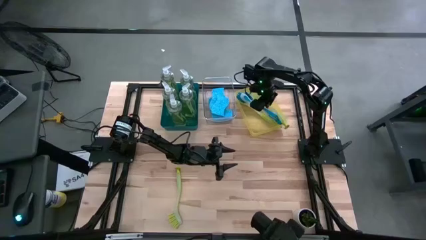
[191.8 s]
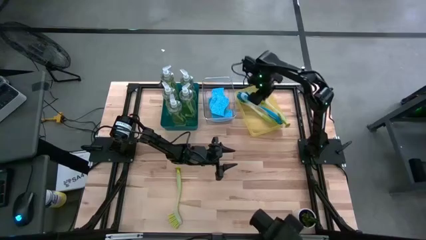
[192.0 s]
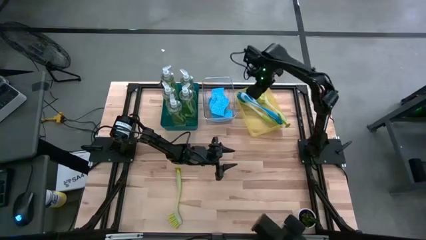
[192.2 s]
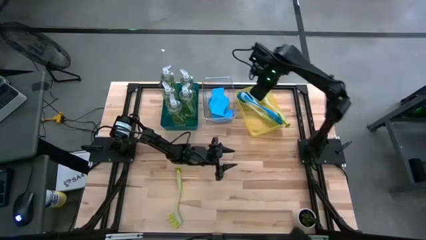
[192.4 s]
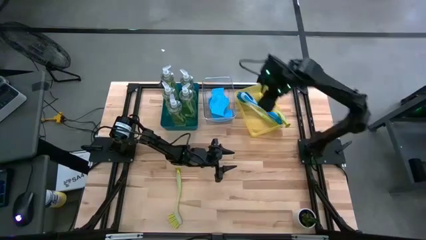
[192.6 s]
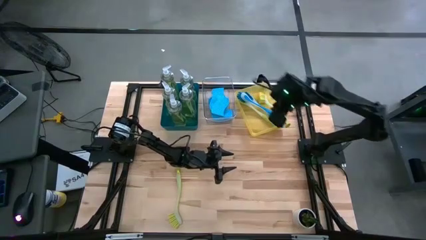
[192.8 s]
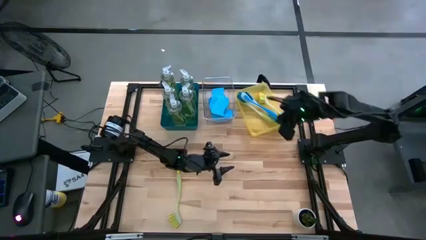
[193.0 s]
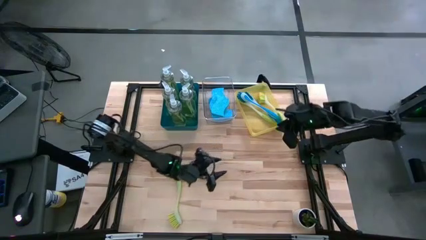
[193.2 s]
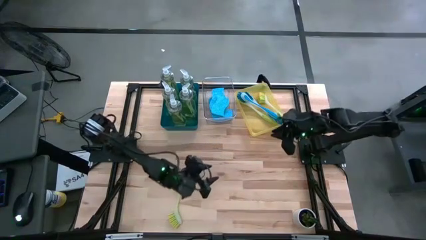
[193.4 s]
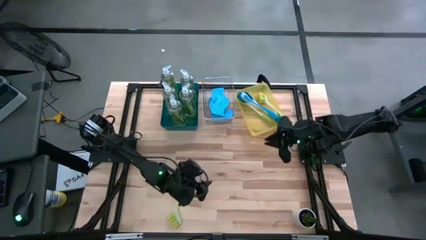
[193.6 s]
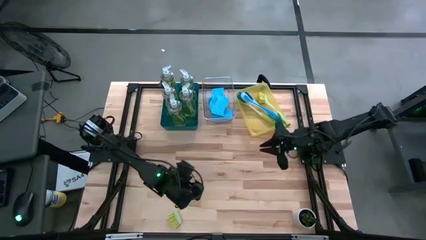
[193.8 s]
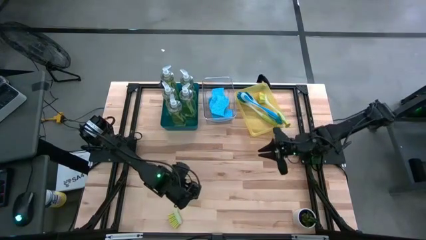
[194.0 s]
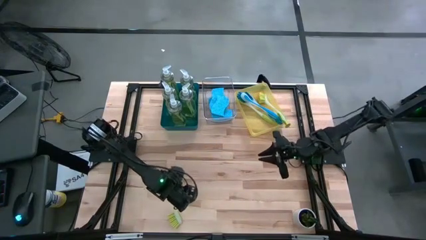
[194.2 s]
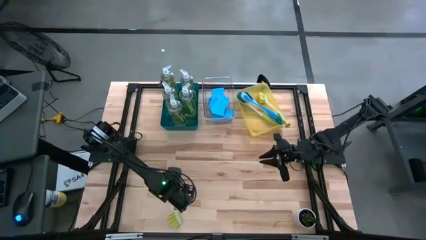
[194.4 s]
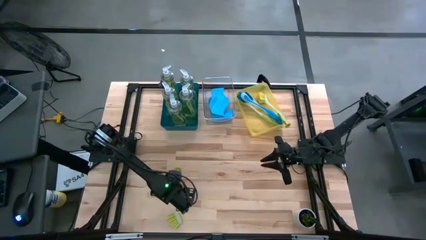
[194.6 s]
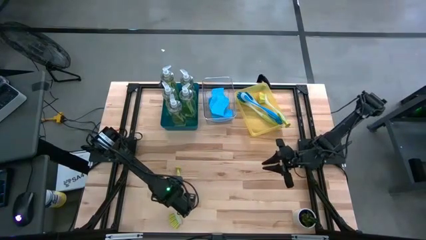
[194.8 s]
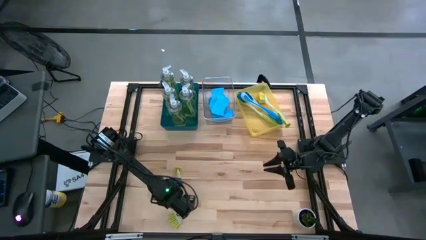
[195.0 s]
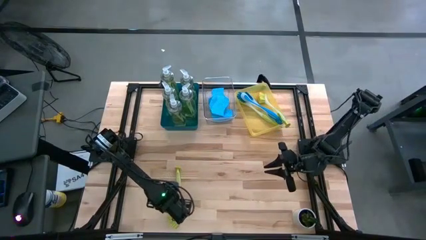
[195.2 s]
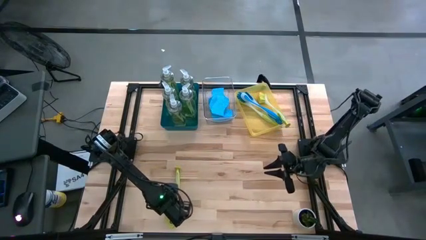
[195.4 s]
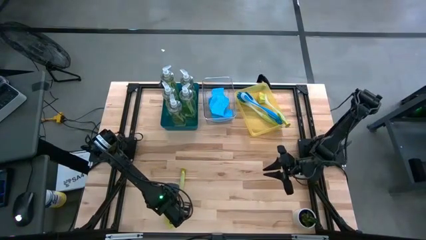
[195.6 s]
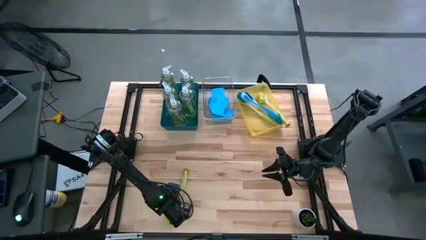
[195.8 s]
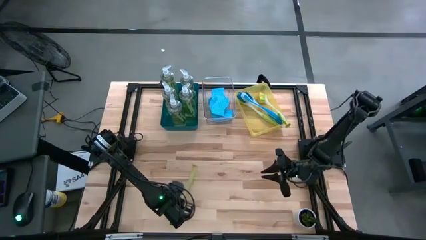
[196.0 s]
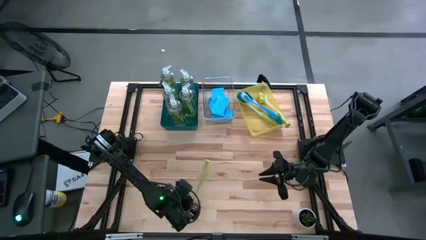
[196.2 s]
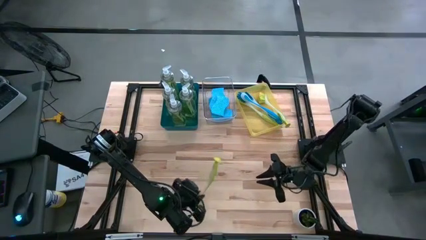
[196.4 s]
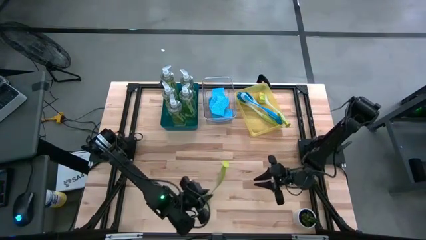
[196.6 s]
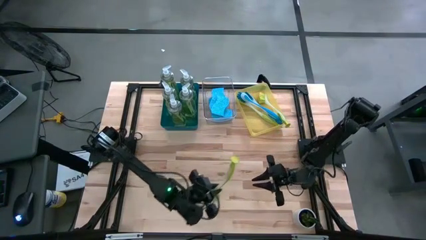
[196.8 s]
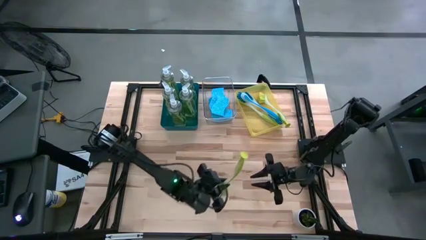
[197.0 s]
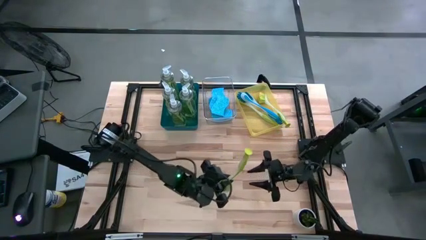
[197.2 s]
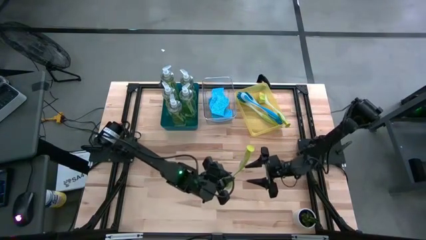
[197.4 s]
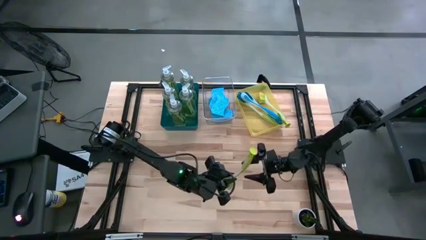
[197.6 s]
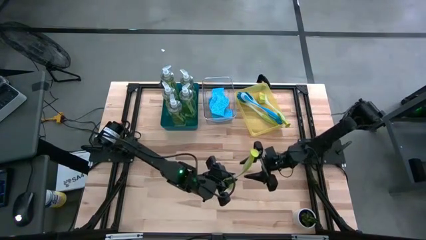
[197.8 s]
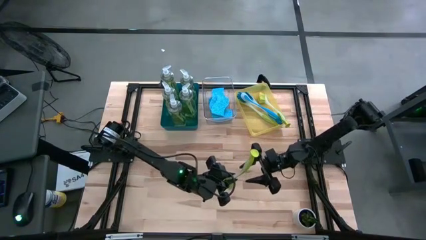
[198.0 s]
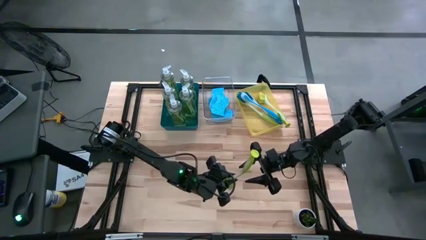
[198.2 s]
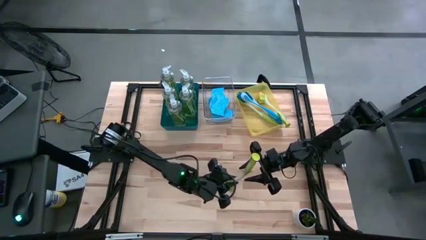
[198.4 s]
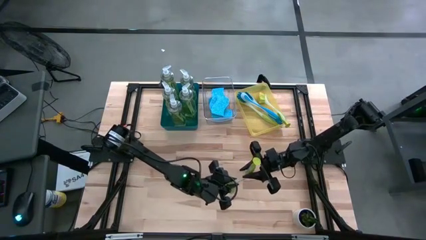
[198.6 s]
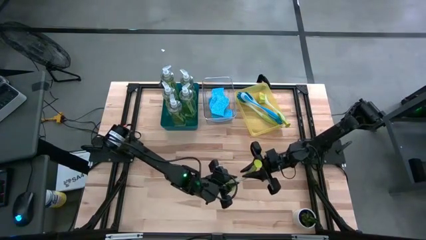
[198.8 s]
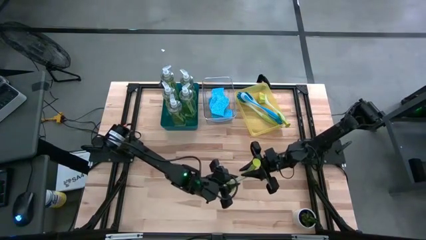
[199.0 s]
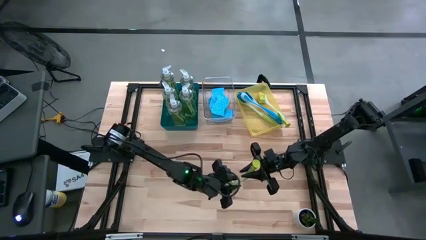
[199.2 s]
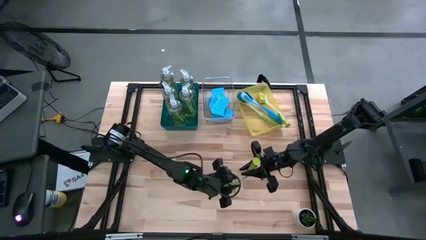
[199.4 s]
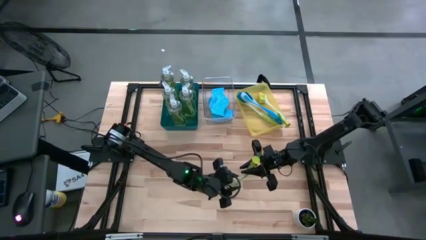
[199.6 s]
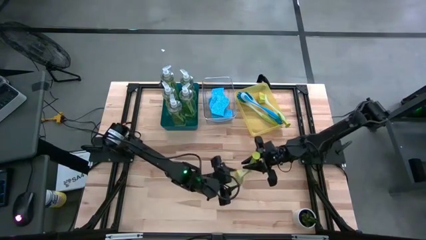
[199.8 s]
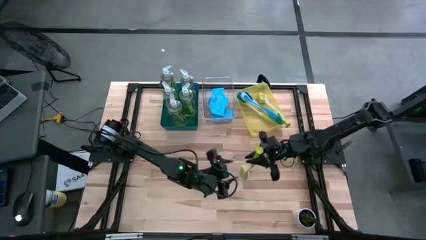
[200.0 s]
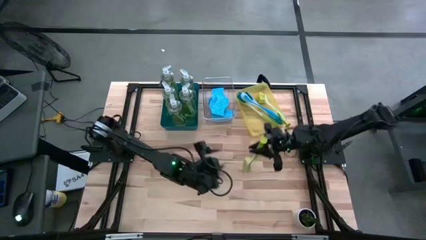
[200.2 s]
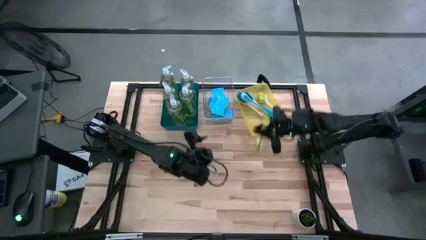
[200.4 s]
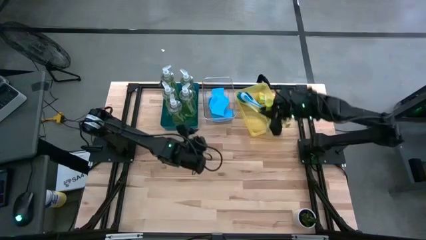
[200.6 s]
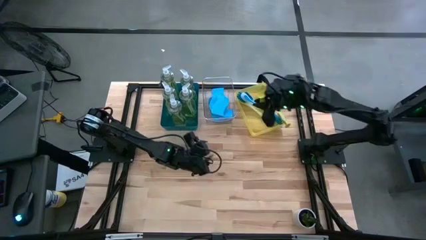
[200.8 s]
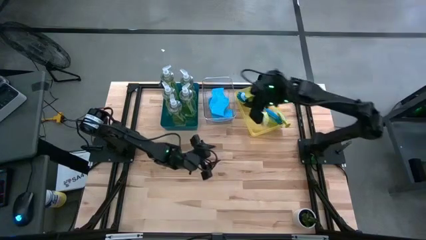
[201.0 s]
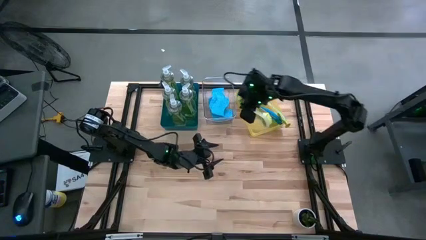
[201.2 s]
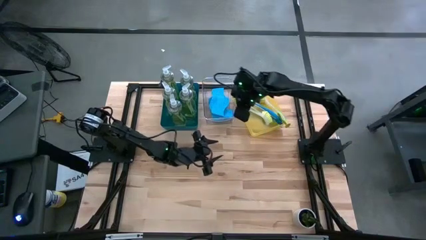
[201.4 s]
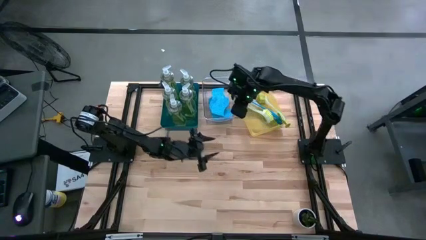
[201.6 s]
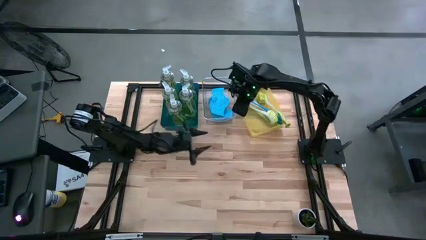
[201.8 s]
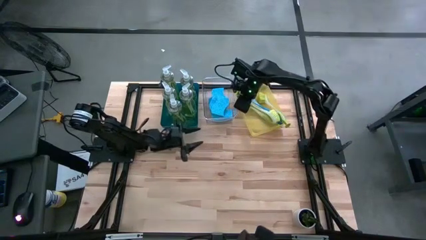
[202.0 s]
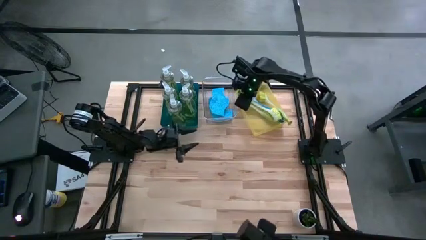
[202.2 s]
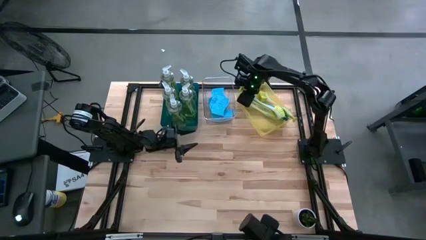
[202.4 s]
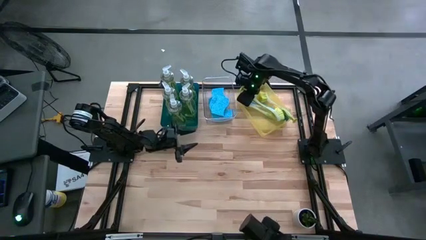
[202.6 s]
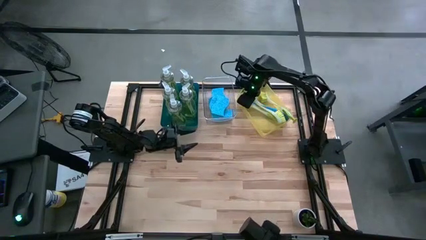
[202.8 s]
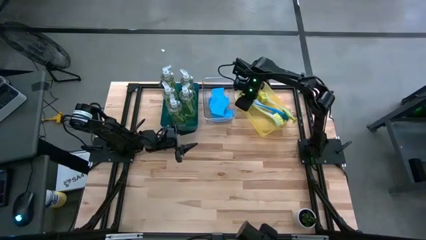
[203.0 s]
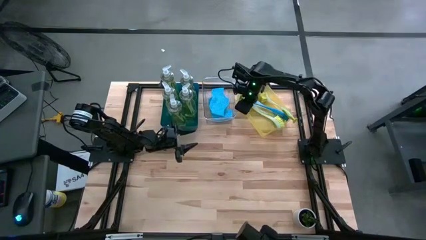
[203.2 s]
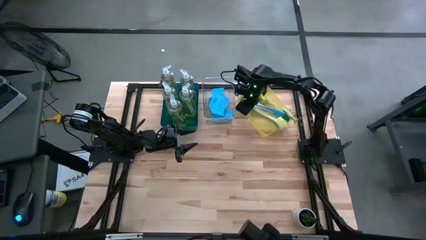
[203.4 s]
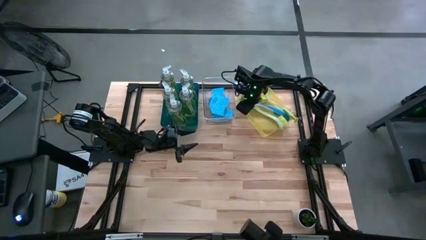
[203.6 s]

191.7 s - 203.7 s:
Task: Pick & Place Kitchen Sink Supplies
Put the yellow dish brush into the yellow bin

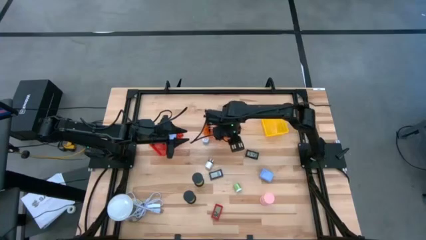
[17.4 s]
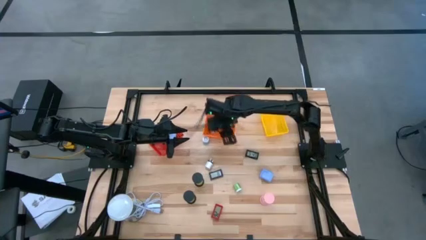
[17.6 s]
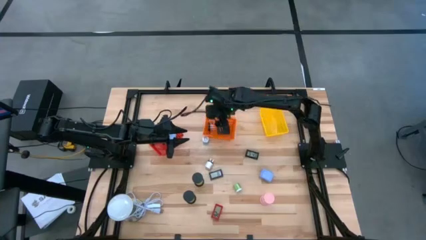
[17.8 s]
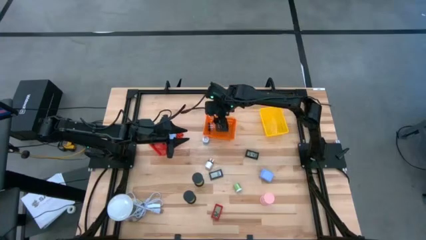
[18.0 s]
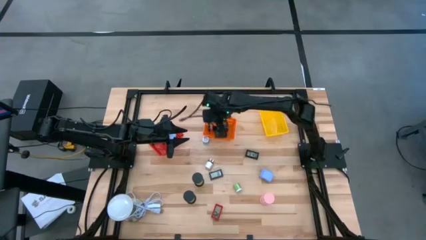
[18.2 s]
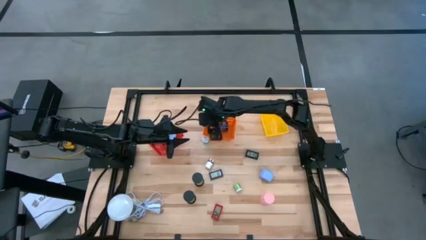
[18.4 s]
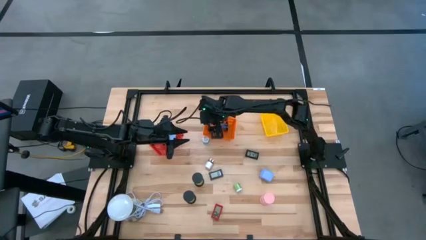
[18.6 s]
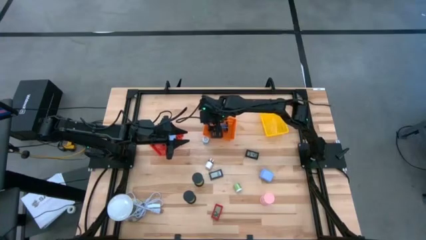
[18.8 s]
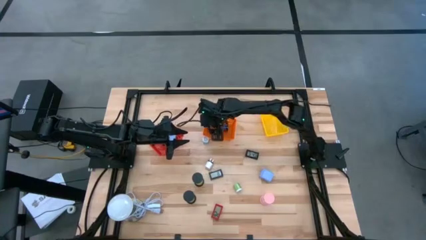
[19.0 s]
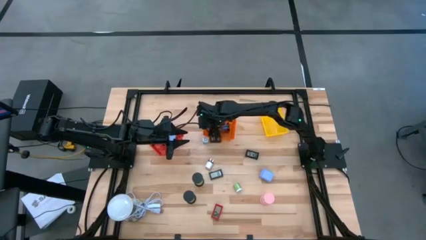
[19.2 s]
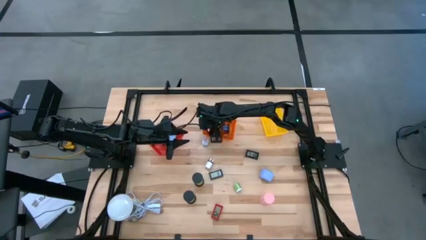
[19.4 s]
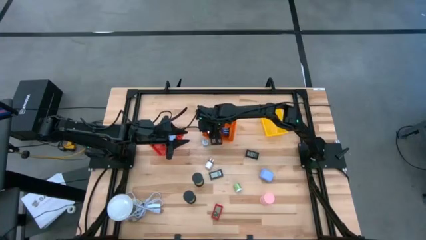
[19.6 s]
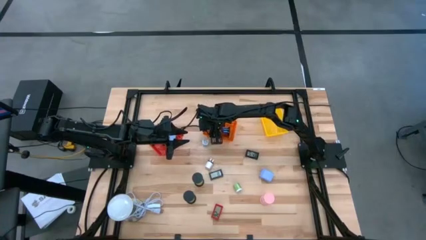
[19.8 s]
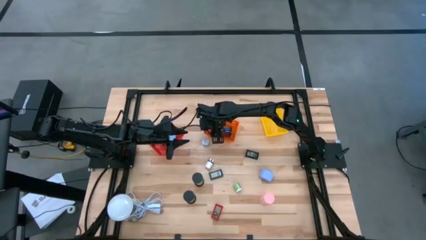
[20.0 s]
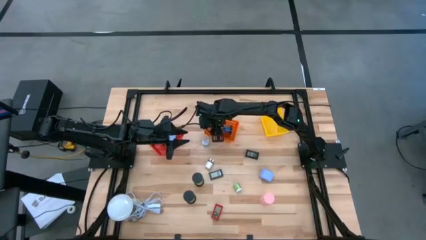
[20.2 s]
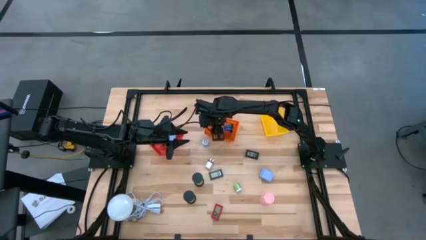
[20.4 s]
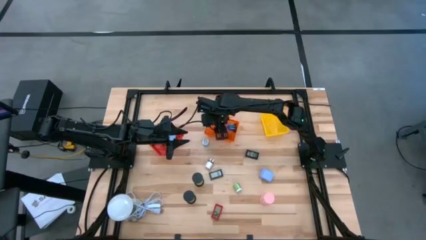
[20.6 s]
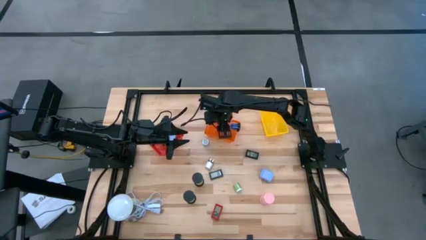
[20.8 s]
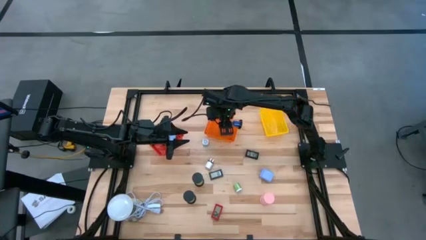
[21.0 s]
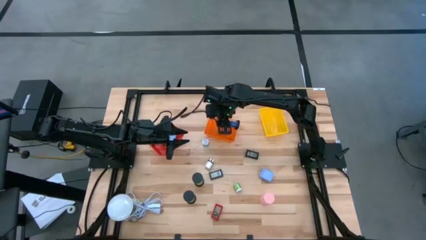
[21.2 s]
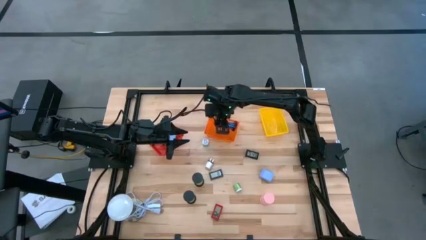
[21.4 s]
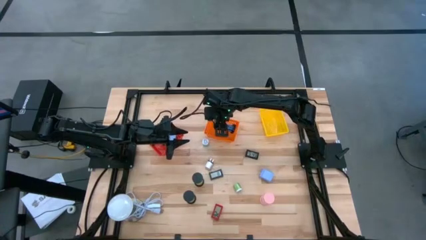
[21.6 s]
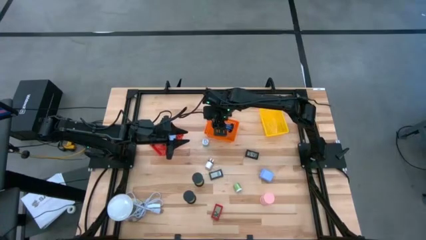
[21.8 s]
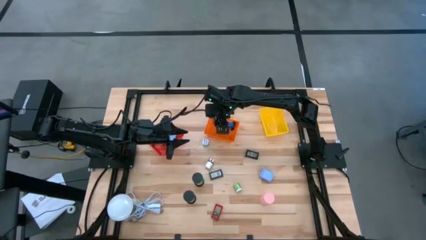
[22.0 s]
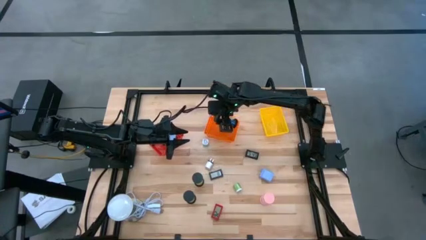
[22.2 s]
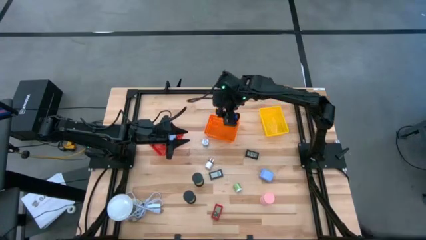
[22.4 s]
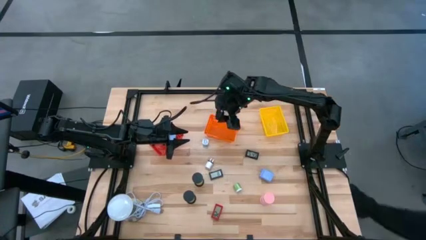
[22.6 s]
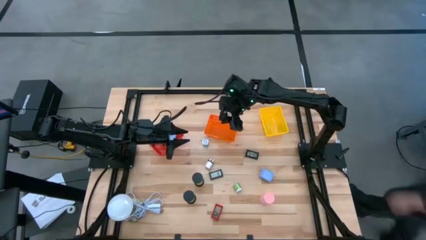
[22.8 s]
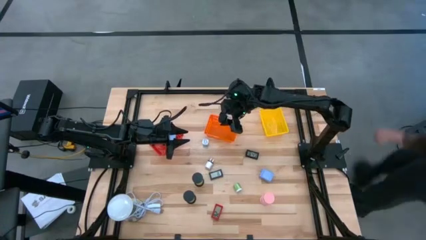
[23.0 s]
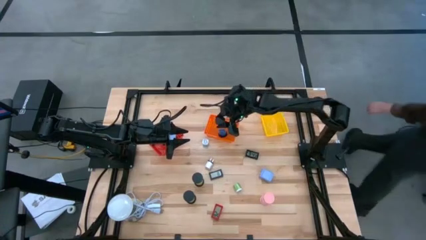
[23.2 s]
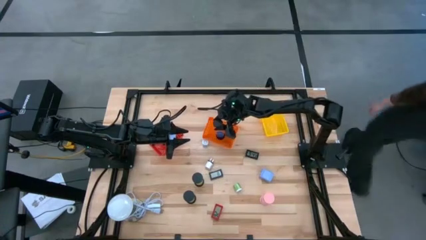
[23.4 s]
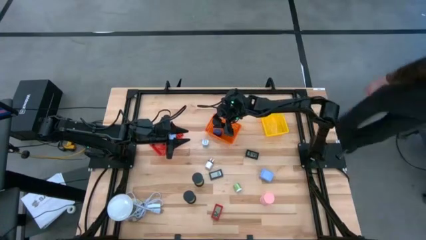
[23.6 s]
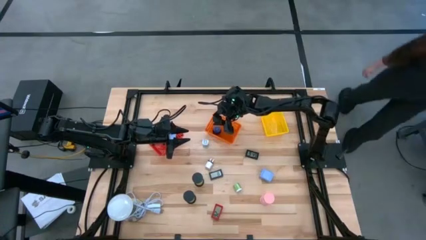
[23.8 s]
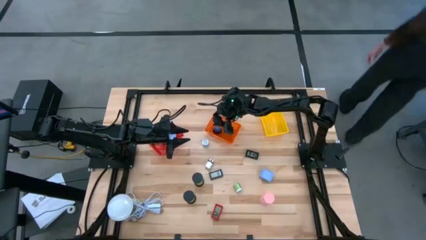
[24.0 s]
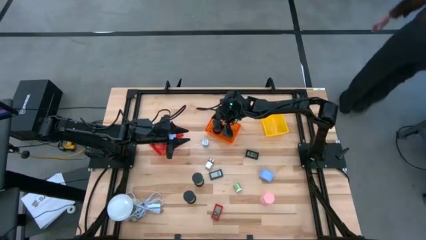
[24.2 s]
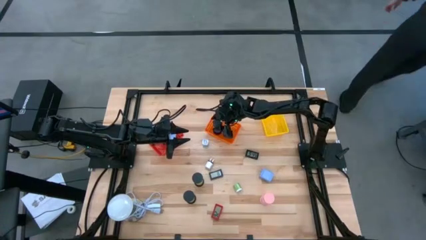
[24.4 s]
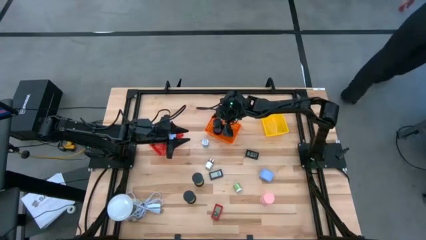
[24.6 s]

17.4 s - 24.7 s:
Task: Pick & Place Office items
Adjust the black hourglass in the orange basket
